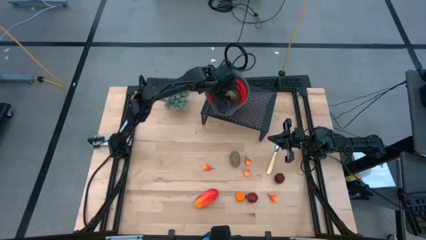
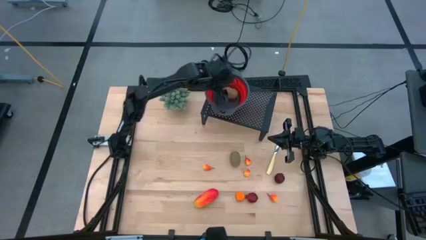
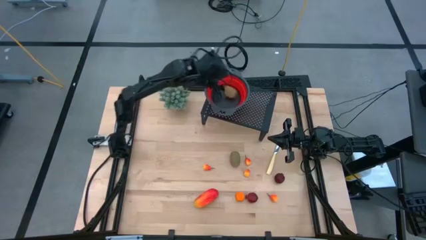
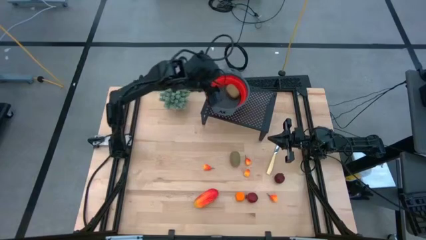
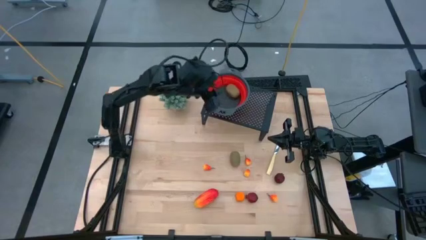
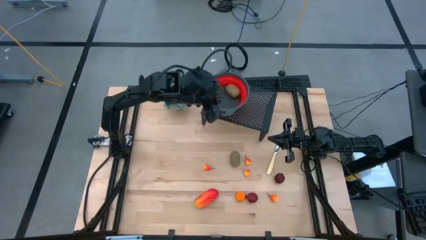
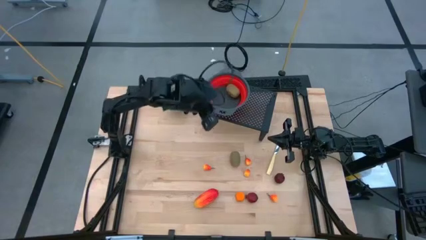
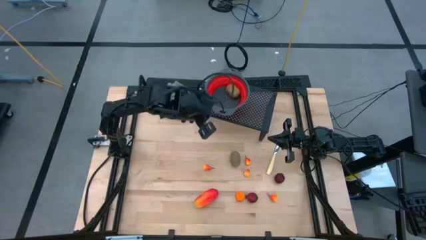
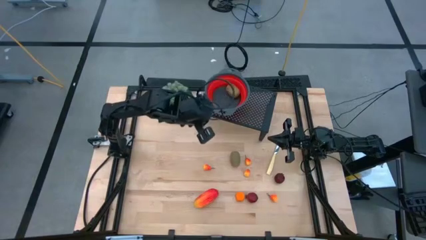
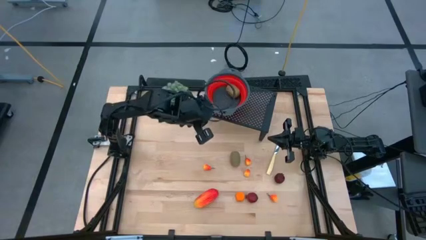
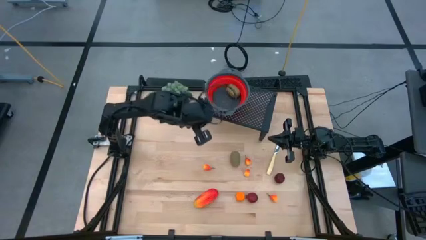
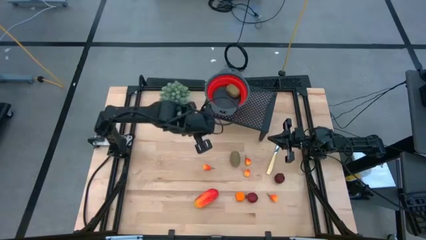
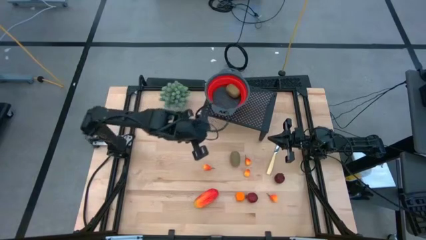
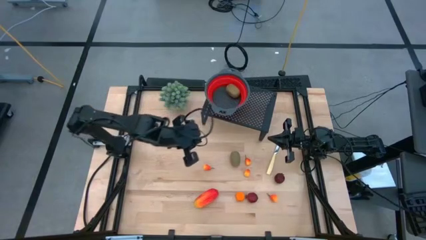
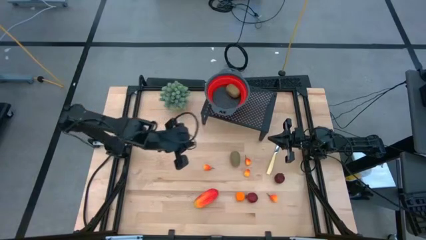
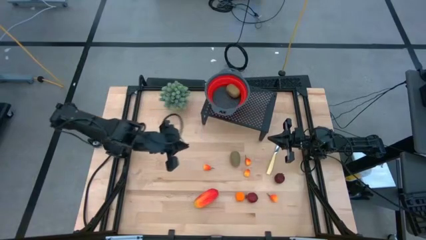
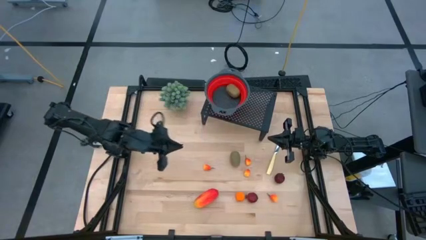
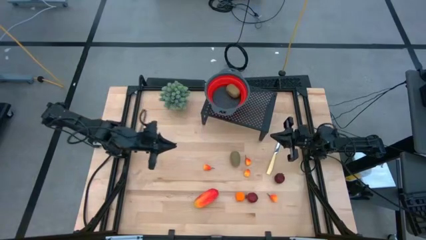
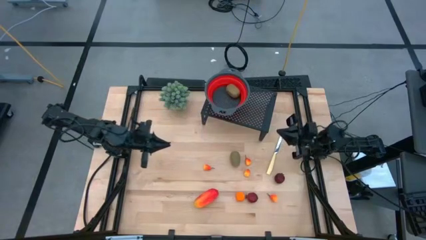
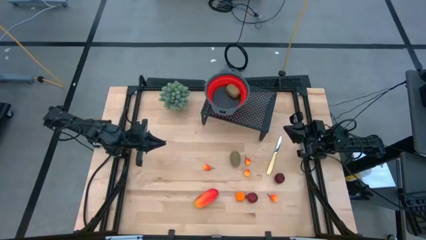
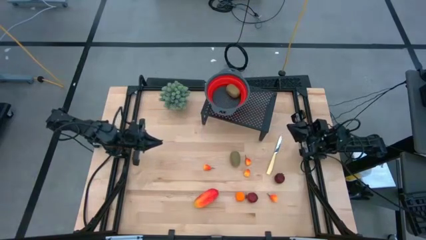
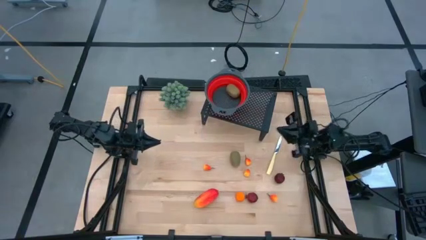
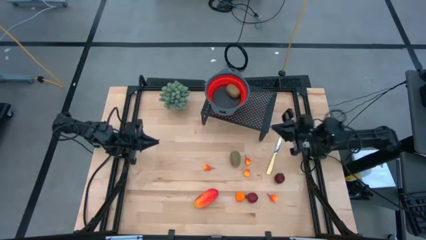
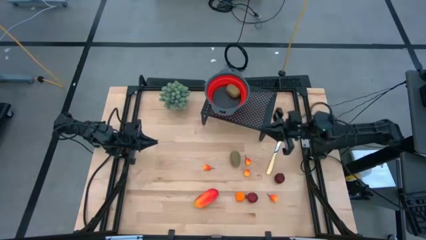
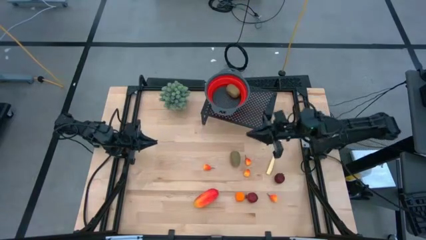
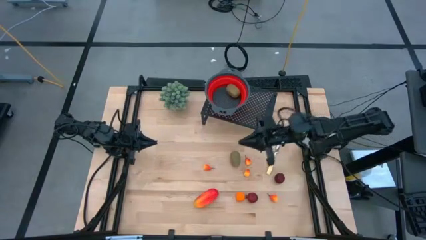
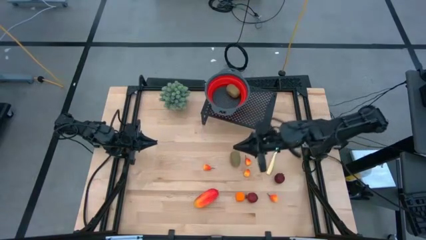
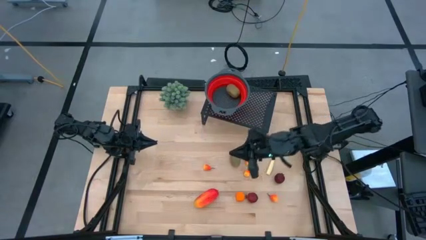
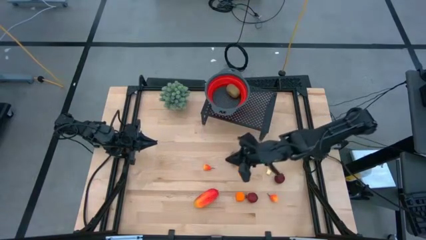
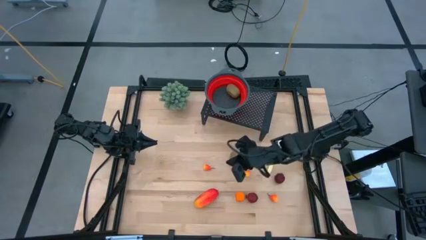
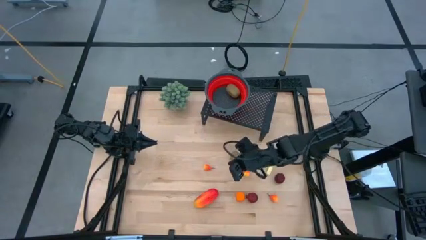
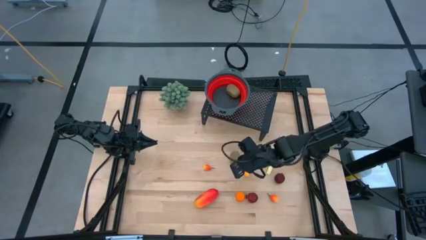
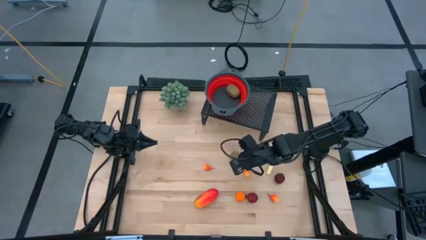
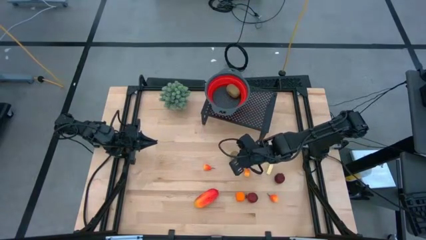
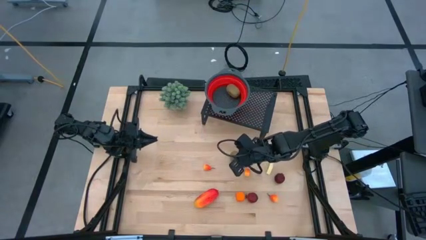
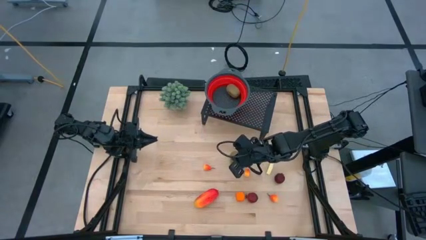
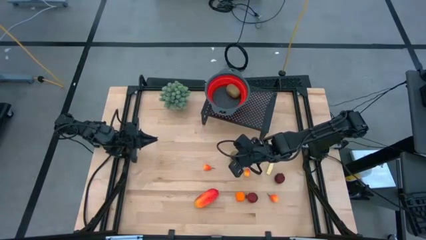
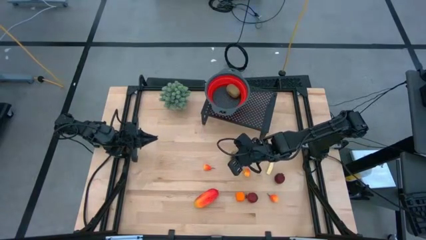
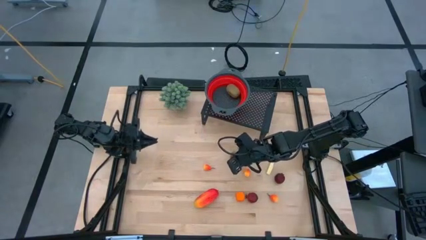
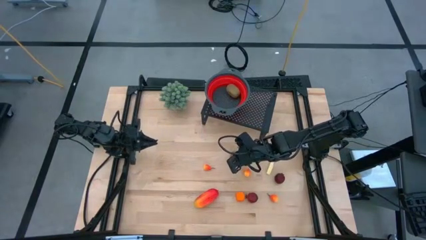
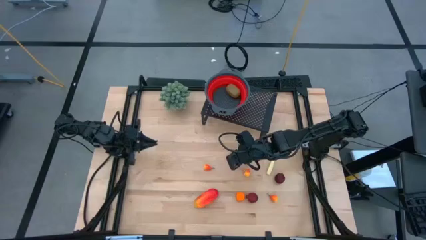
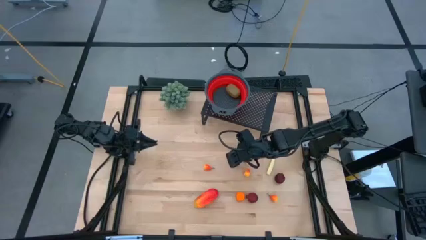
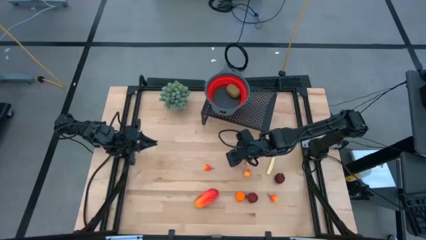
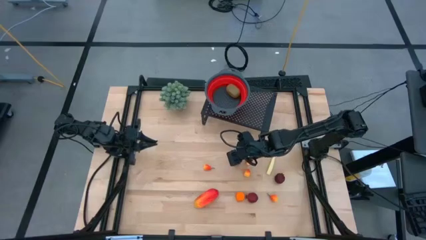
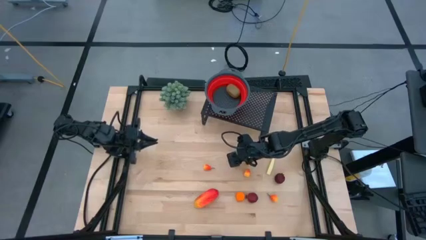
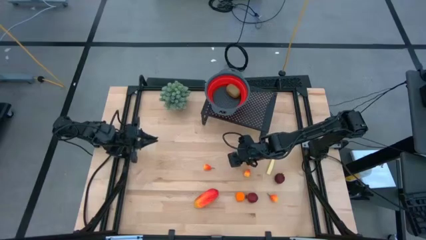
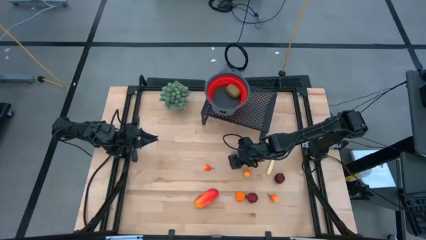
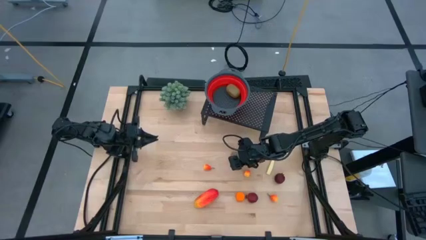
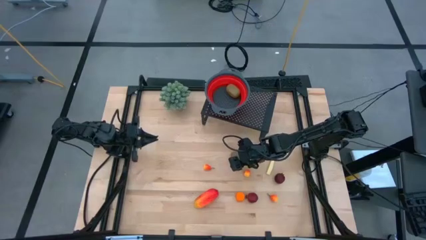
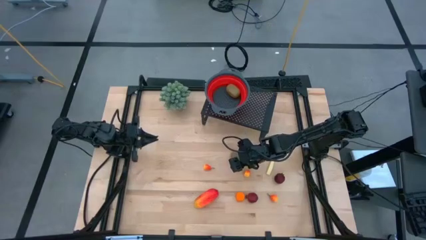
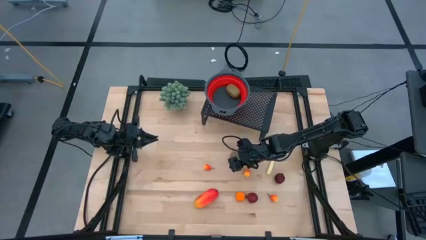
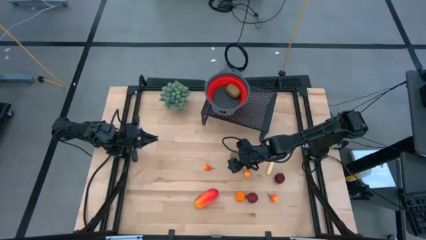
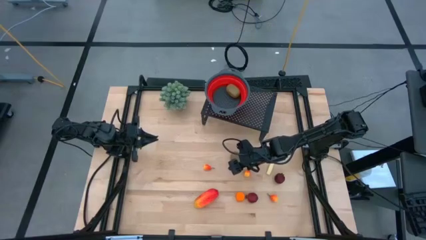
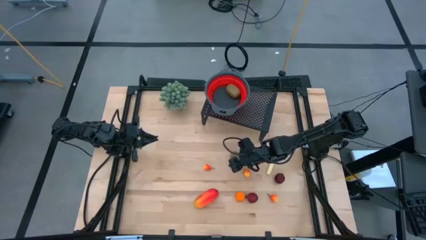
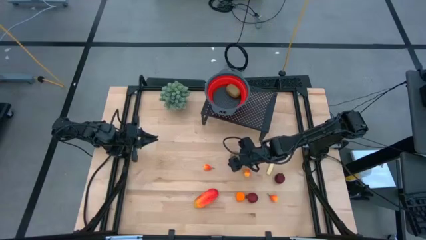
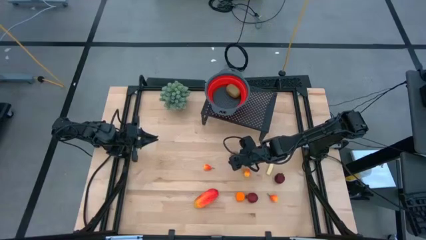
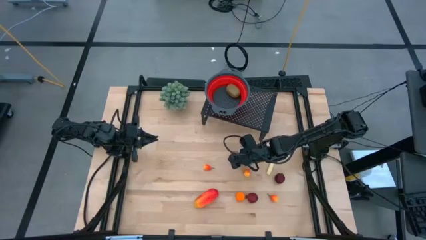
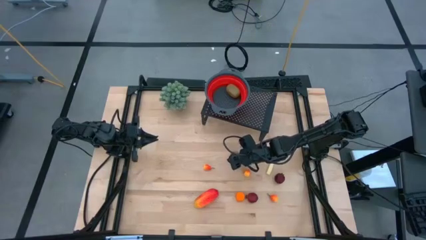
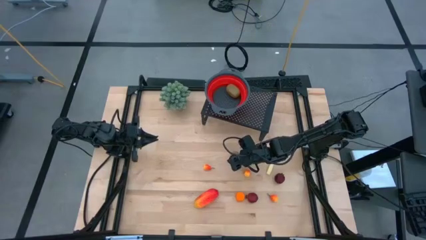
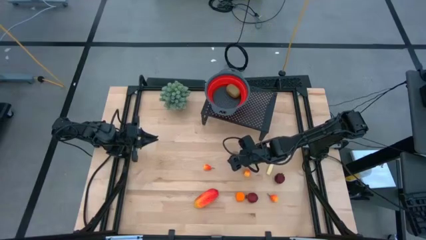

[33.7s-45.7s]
Task: Pick & Place Fruit
Put the kiwi into the red strainer bowl
